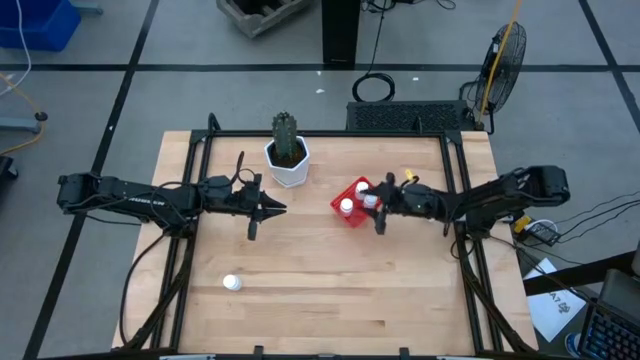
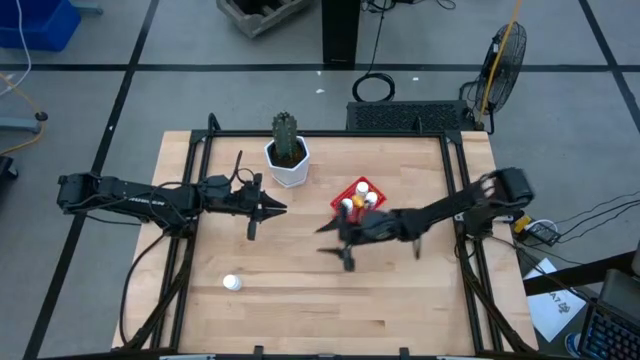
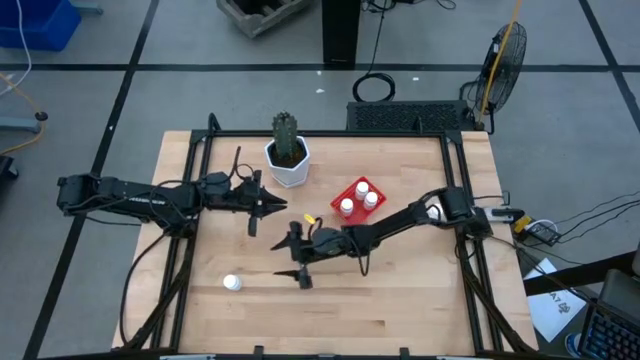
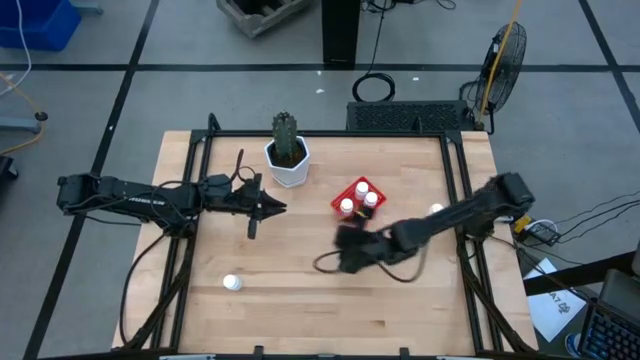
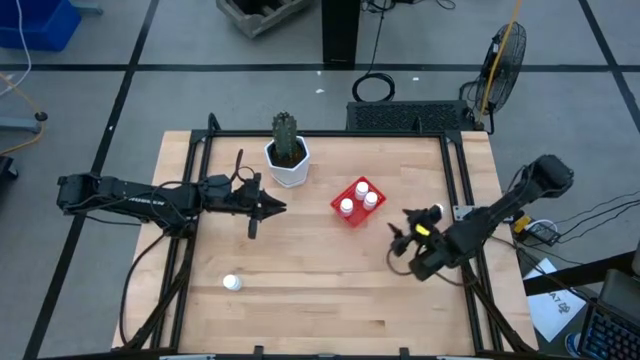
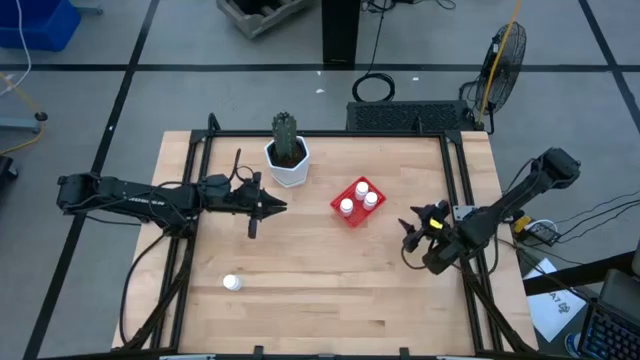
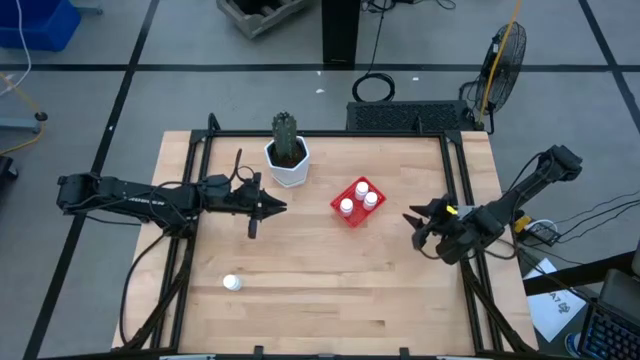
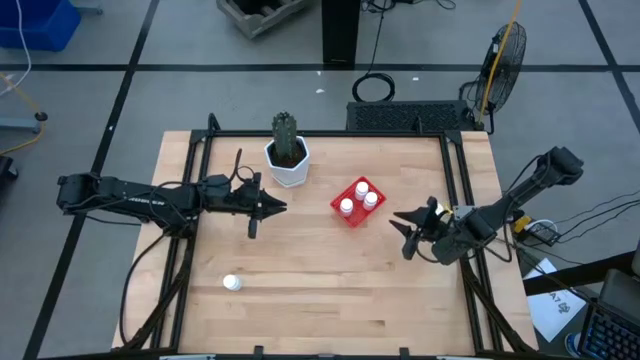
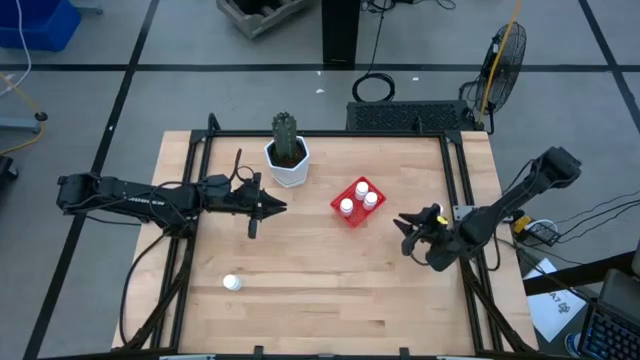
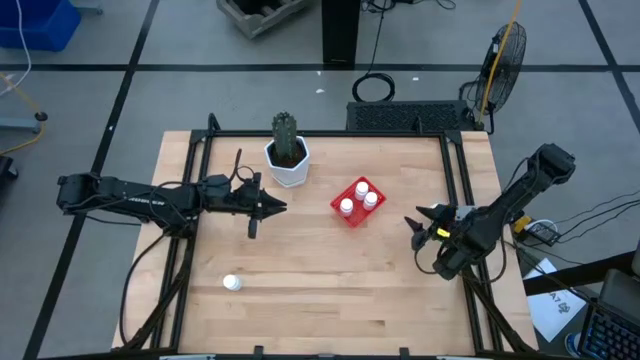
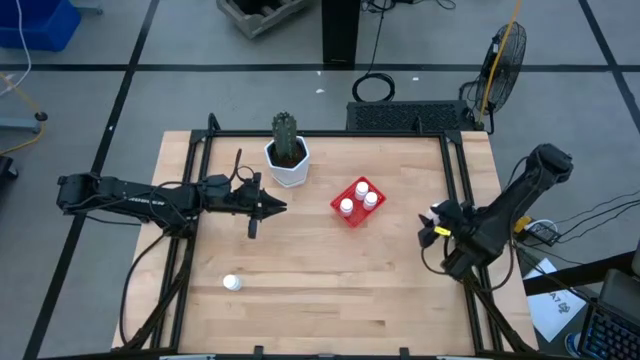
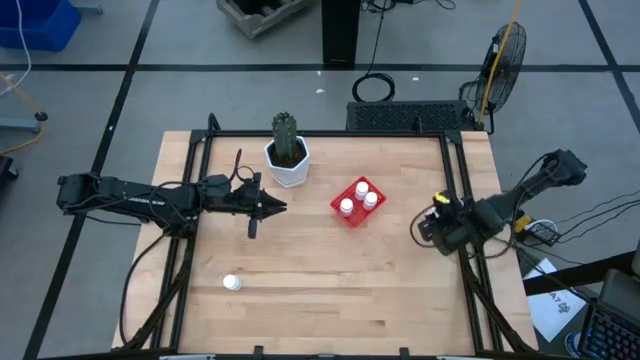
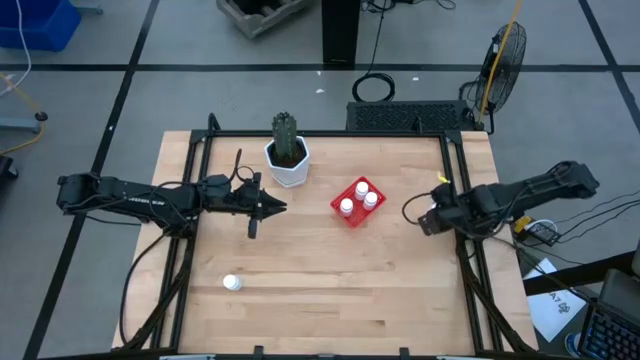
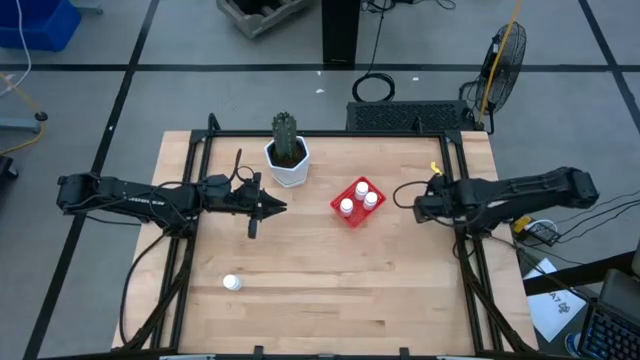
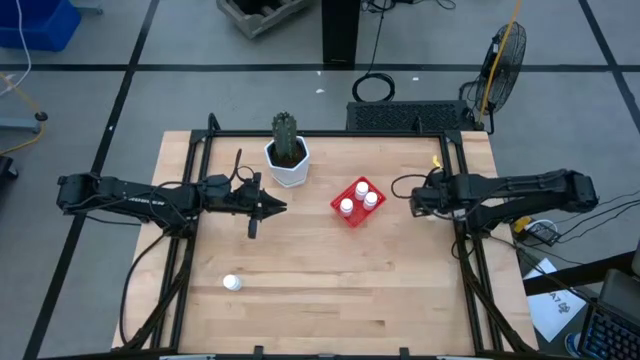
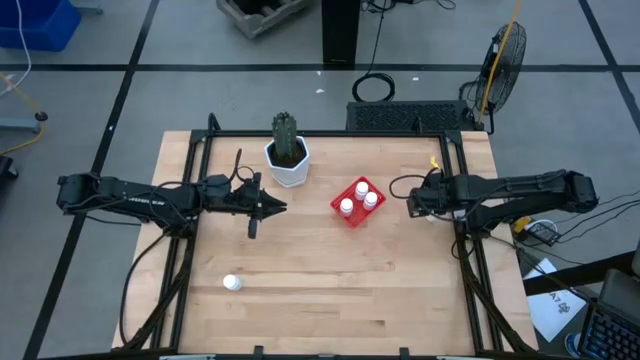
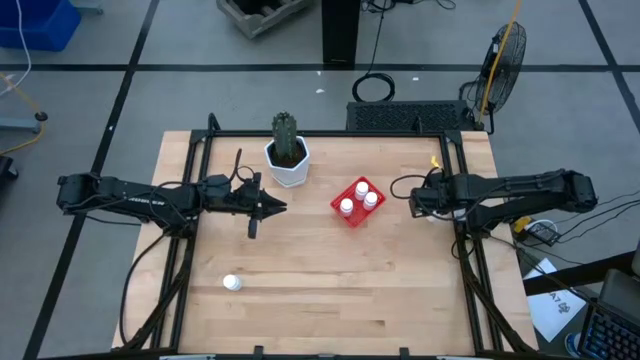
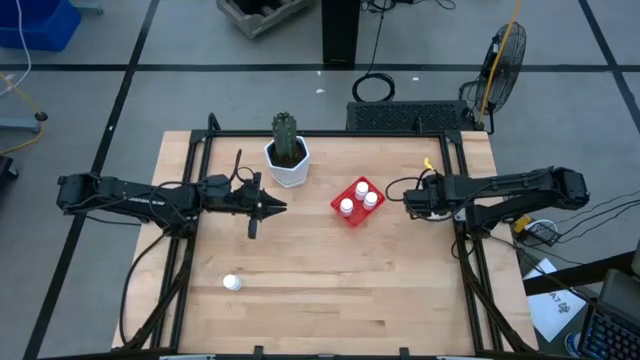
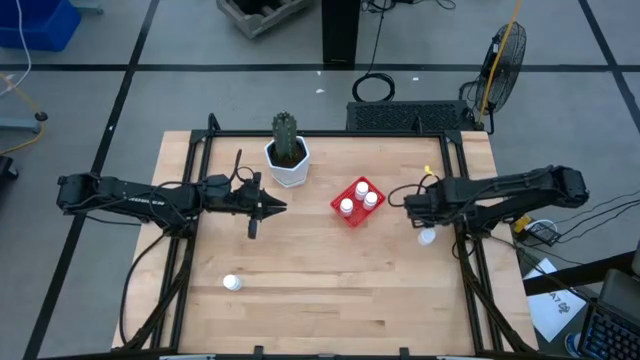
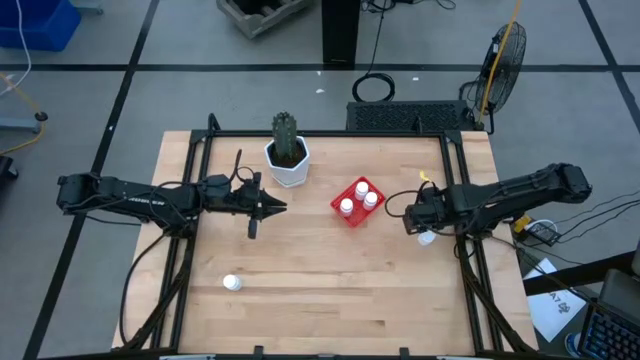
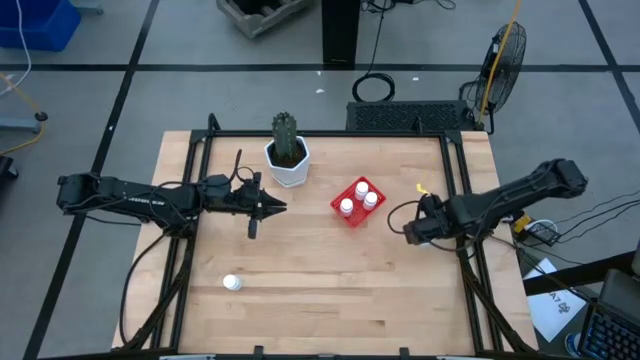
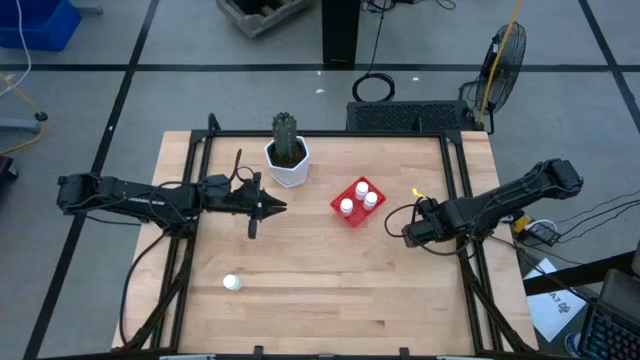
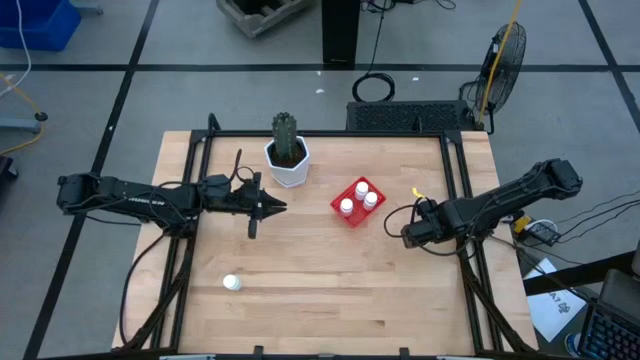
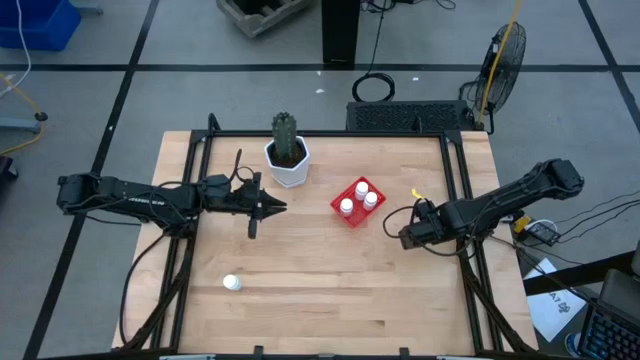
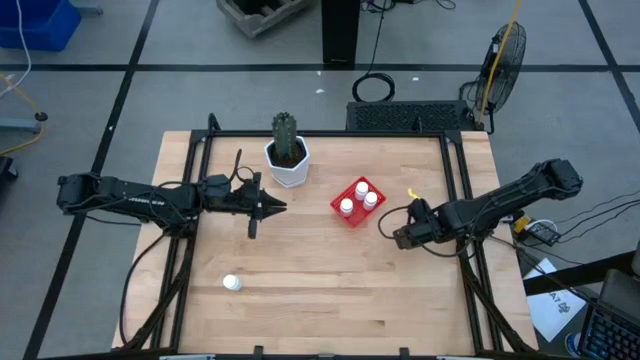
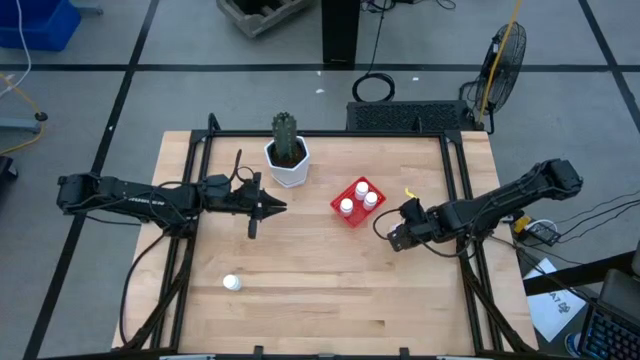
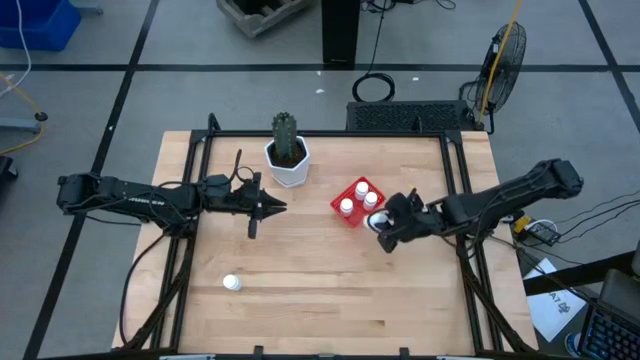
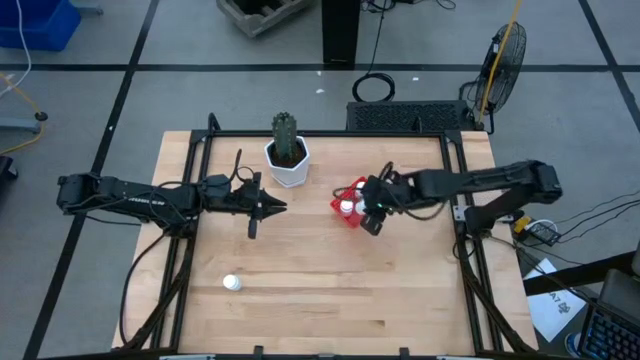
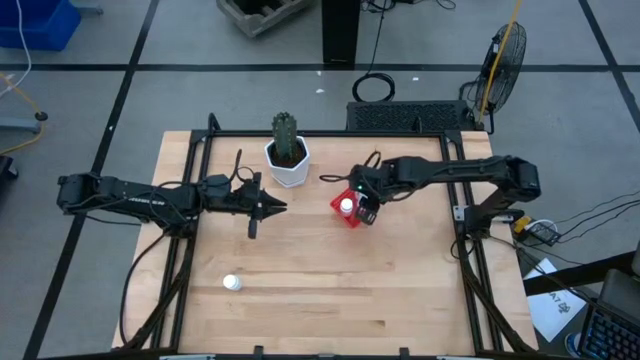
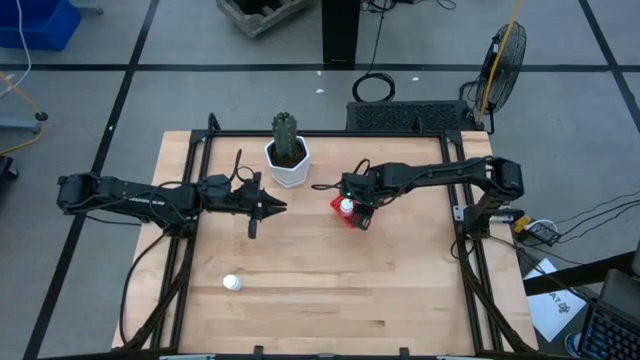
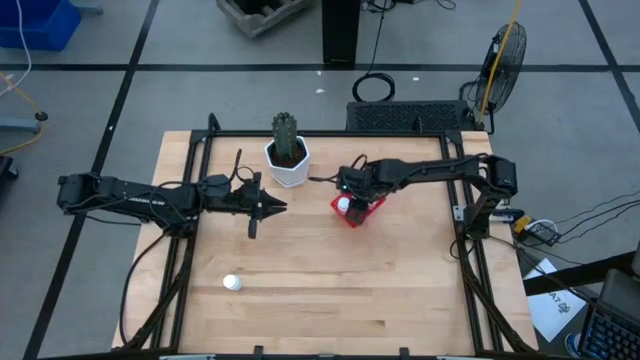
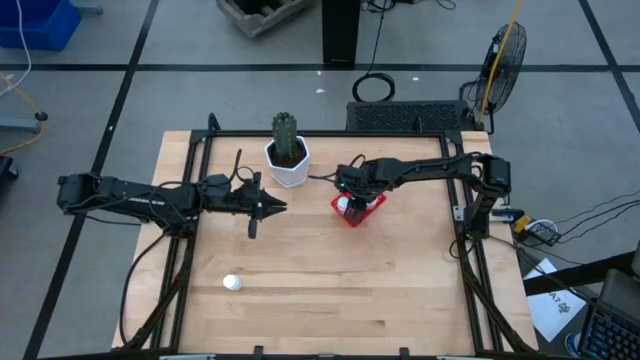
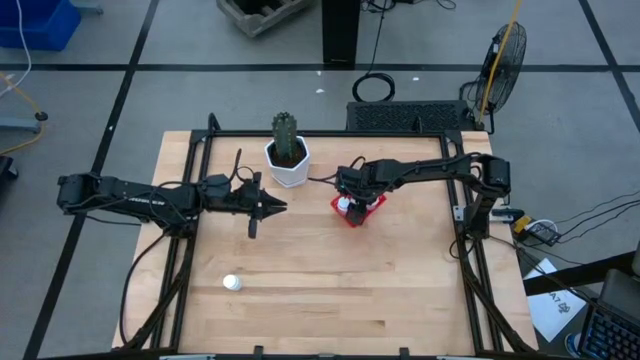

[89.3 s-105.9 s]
Task: Pick and place pill bottles into a basket
Put the white pill bottle into the red bin

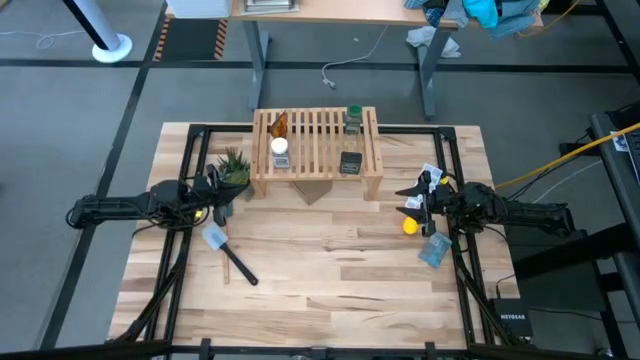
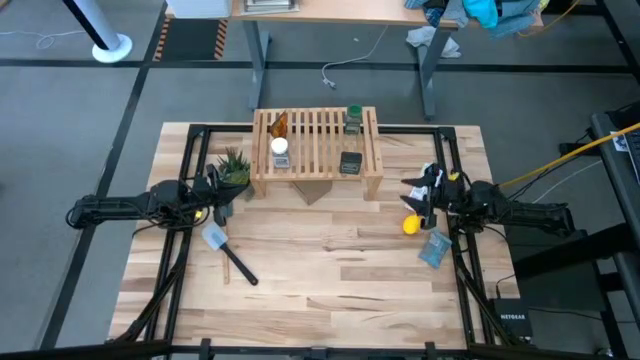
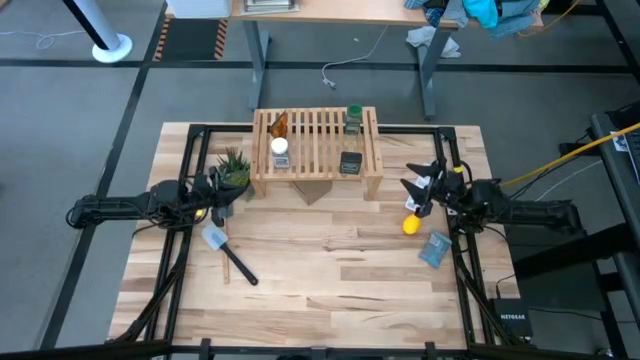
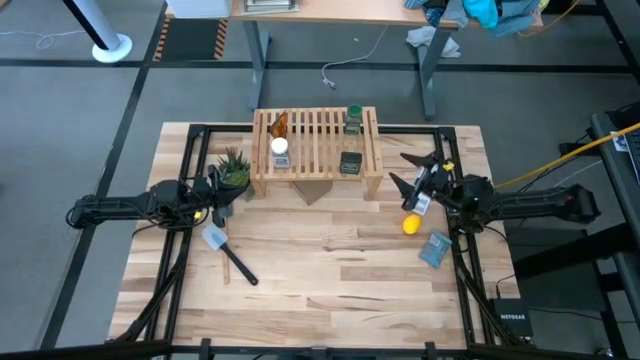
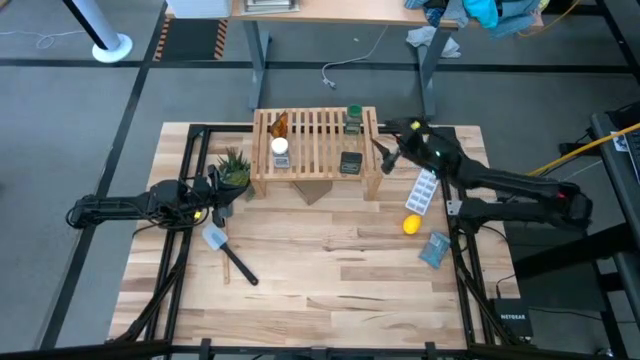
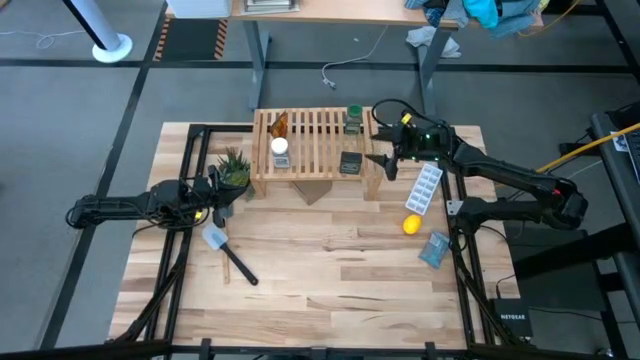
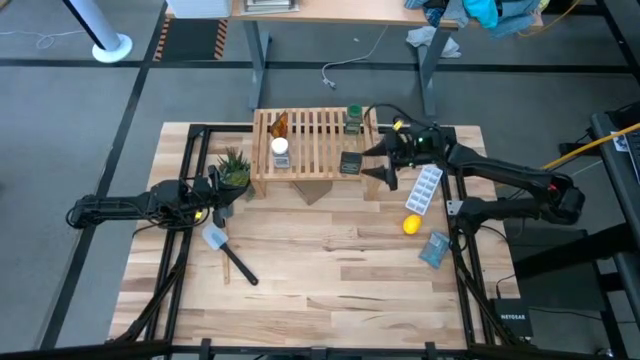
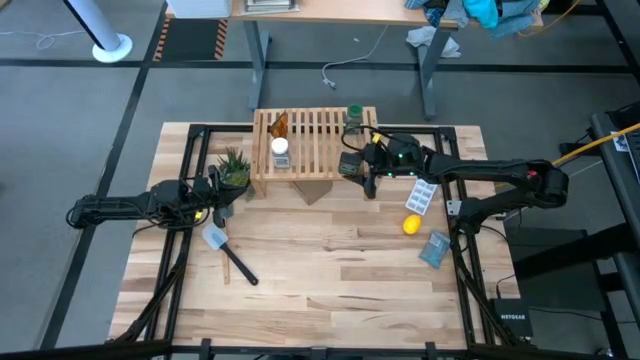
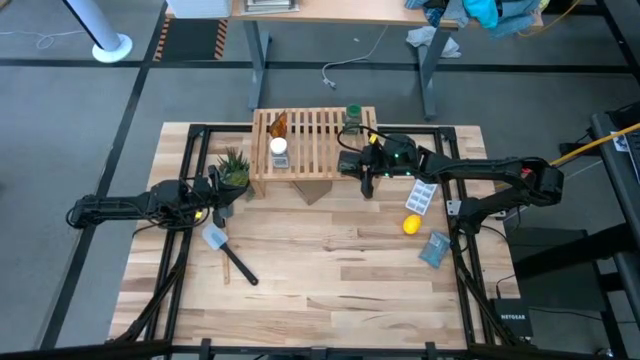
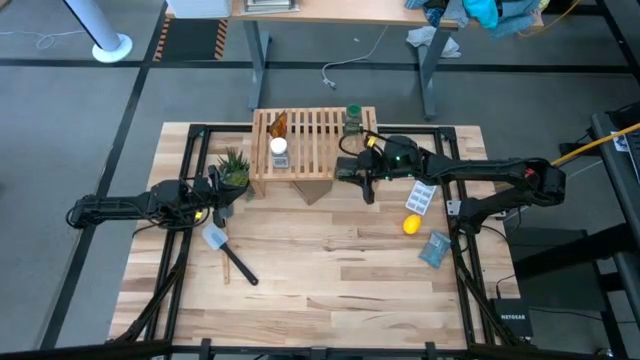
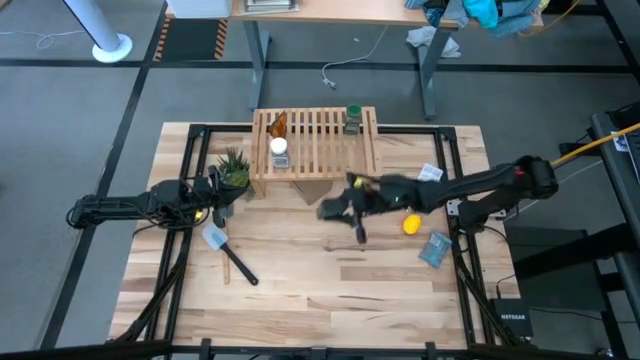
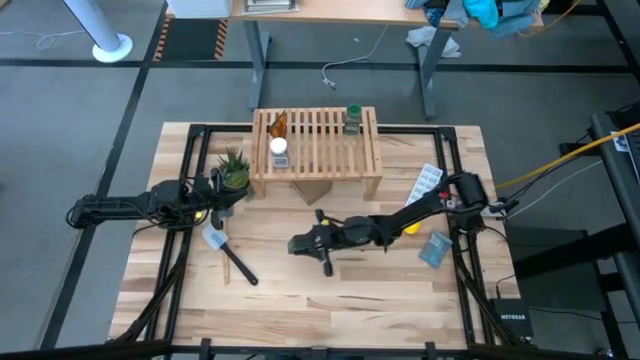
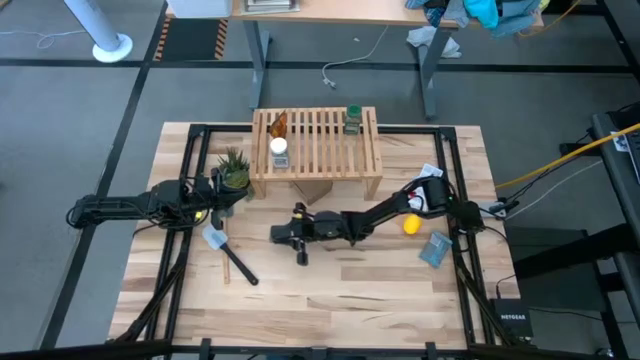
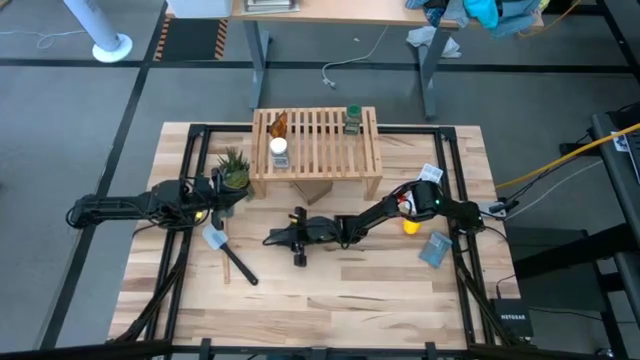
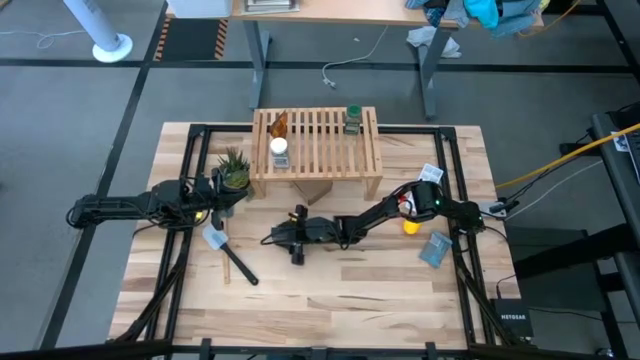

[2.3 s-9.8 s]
Task: Shelf spices
Remove the black seasoning can from the shelf to the table
